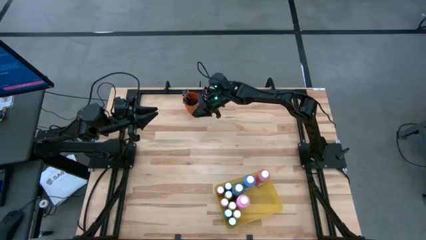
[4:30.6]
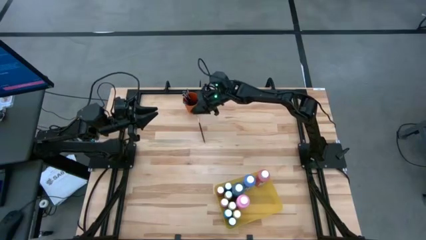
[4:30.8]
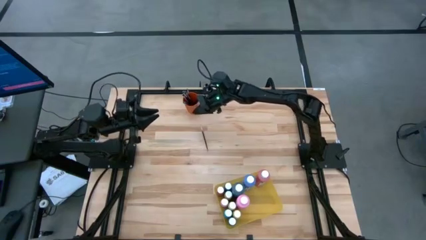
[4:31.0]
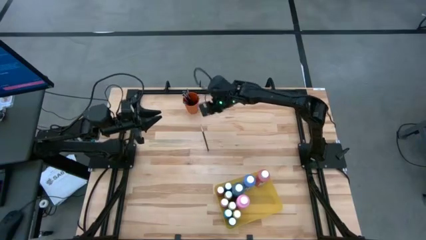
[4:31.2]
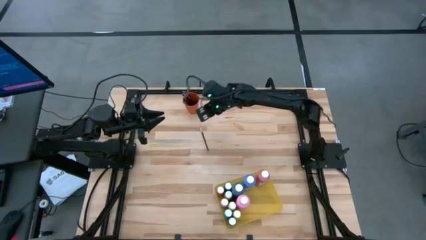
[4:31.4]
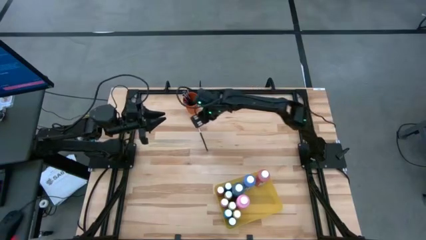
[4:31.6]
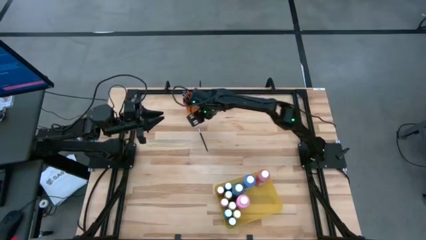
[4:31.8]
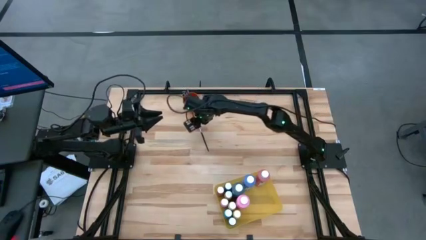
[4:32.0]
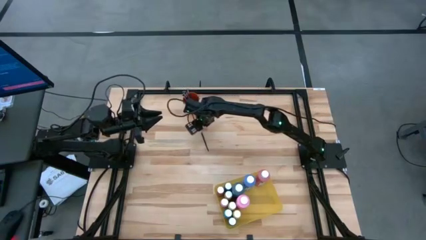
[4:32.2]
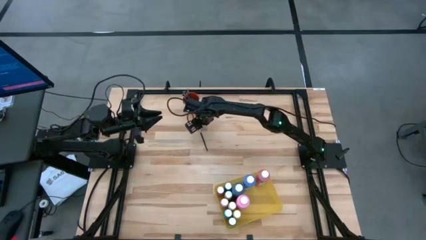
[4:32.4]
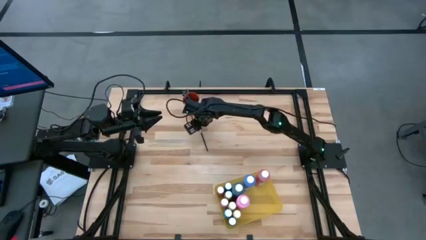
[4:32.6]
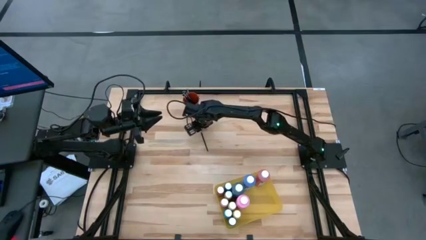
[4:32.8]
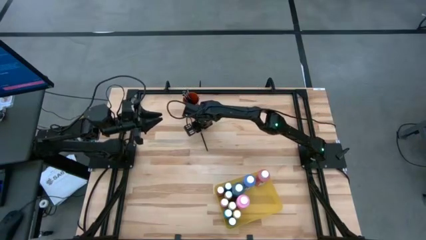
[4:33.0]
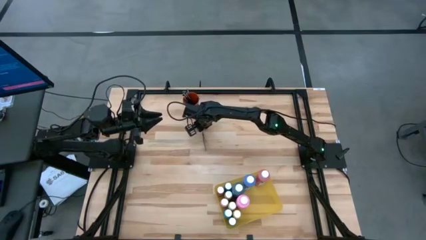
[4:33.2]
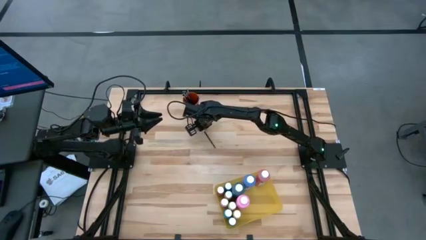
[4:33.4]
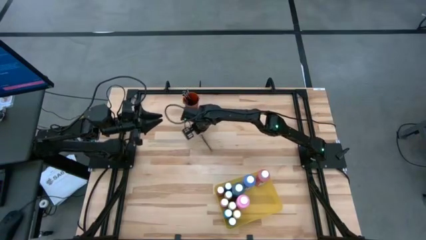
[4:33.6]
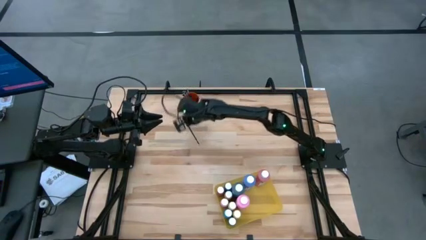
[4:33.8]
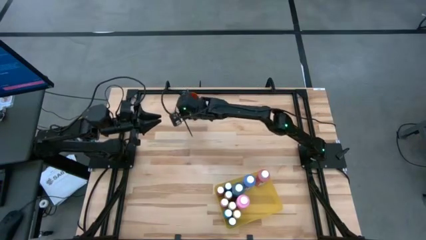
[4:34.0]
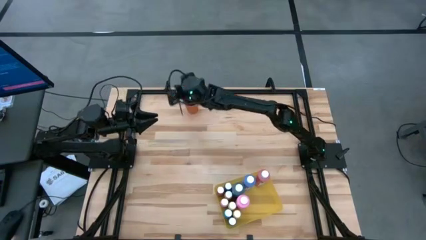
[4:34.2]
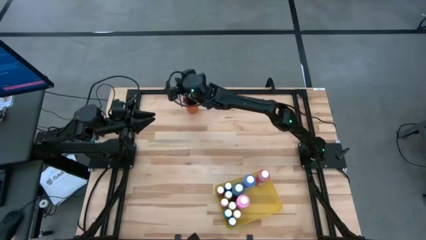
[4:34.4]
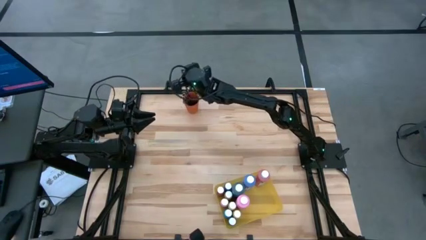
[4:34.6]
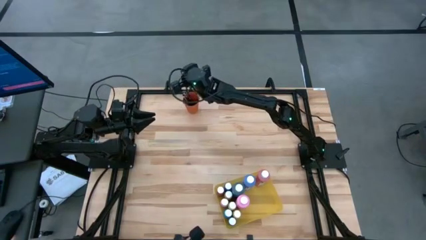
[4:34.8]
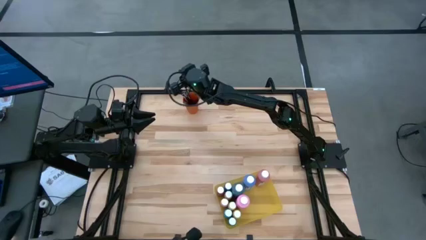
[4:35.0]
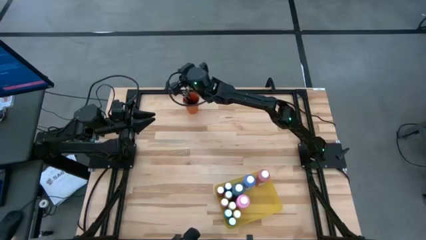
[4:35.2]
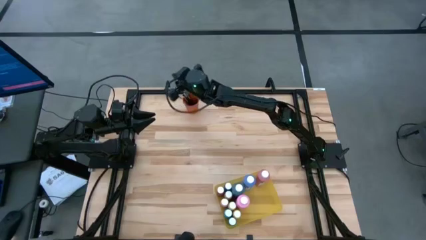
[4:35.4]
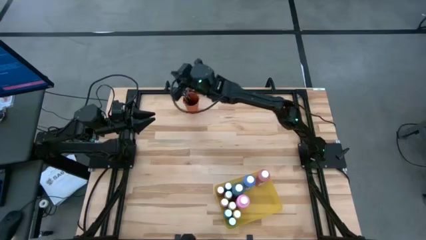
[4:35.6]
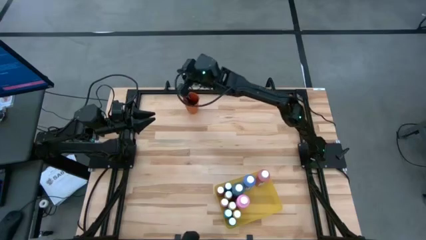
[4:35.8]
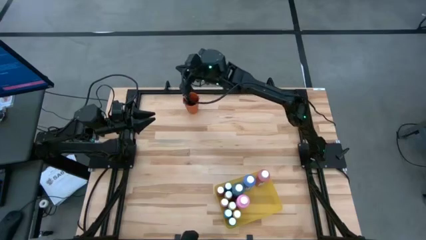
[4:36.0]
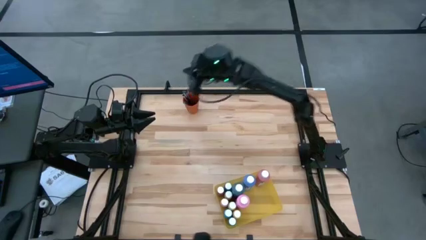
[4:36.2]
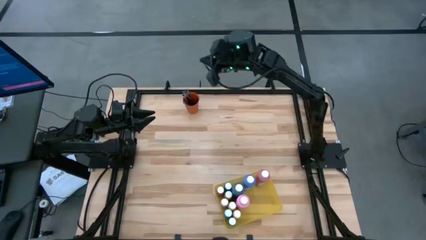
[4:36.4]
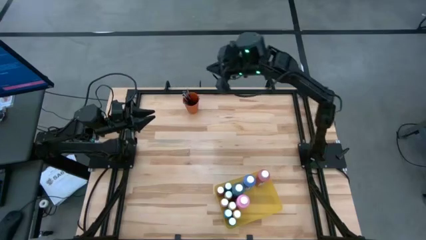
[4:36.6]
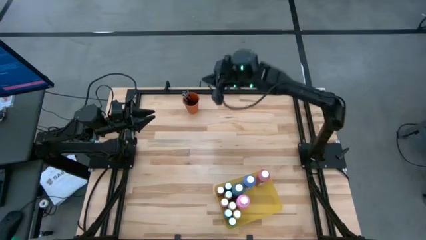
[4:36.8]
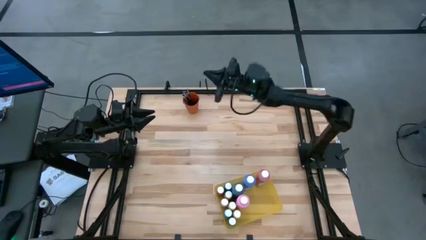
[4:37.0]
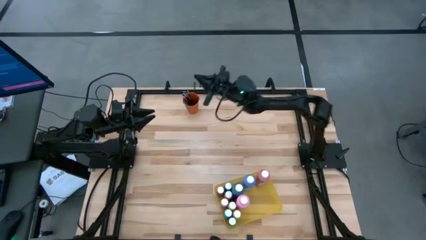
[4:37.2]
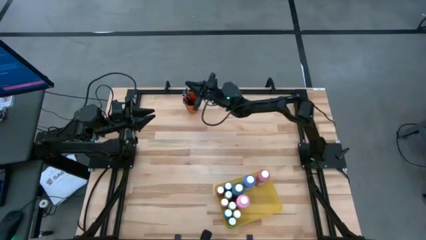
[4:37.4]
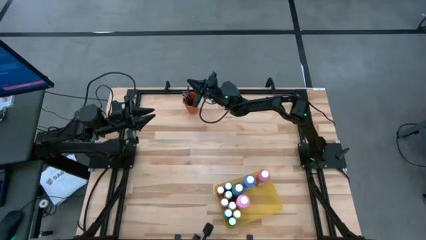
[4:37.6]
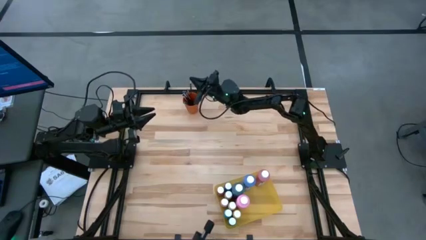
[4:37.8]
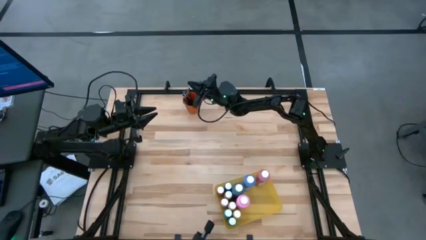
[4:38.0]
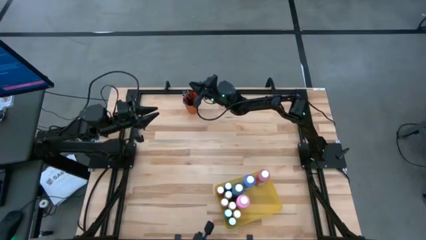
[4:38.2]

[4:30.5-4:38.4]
Task: Pick & Place Paint Supplies
Put the black paint brush into the orange cup

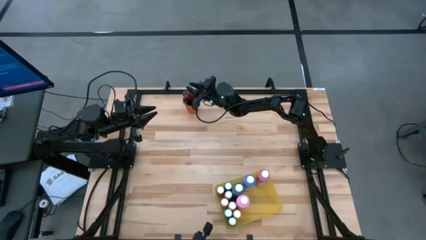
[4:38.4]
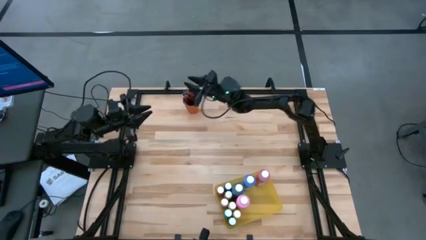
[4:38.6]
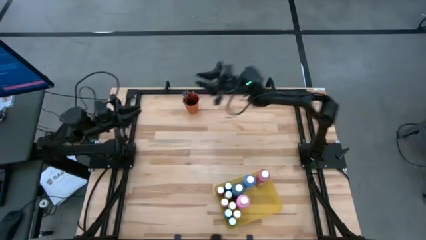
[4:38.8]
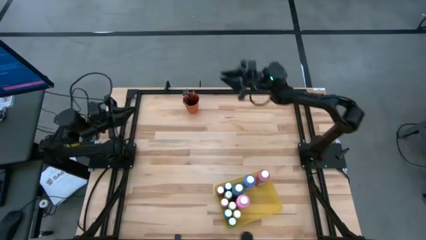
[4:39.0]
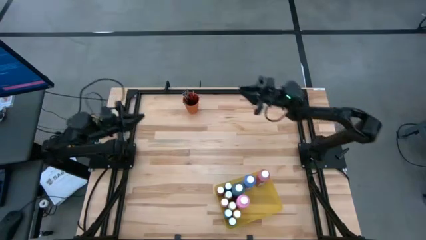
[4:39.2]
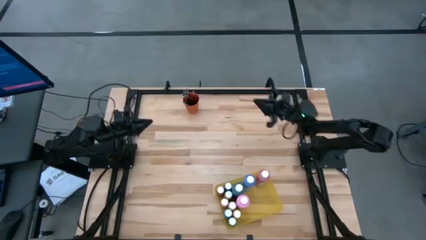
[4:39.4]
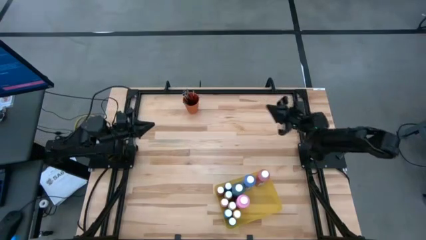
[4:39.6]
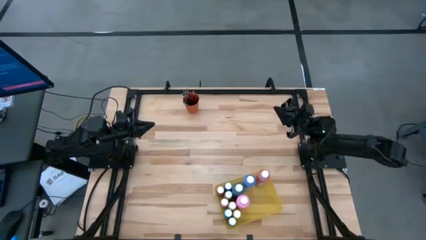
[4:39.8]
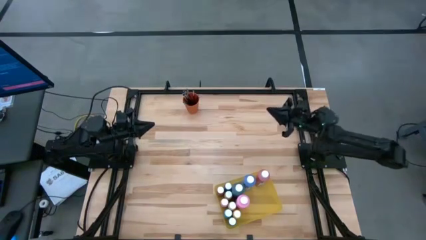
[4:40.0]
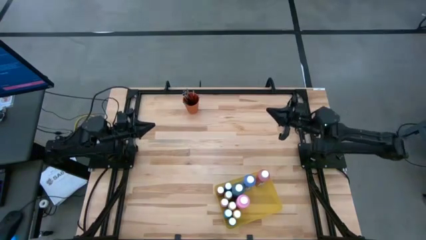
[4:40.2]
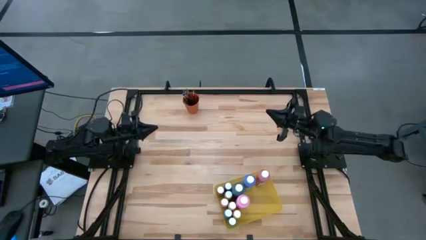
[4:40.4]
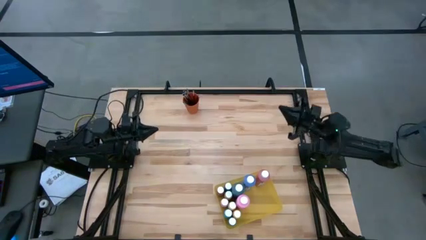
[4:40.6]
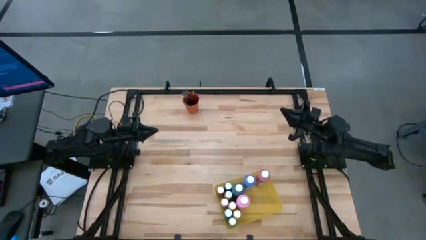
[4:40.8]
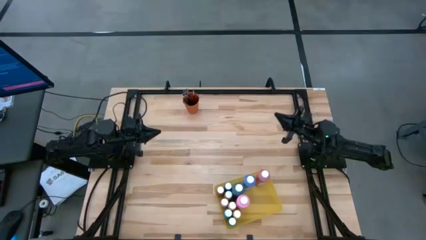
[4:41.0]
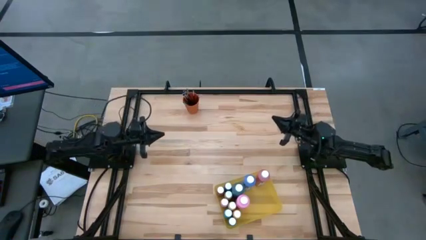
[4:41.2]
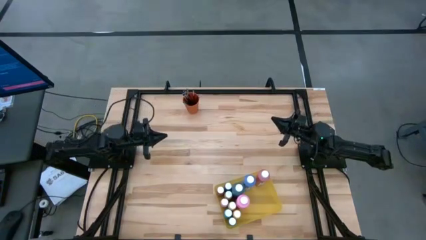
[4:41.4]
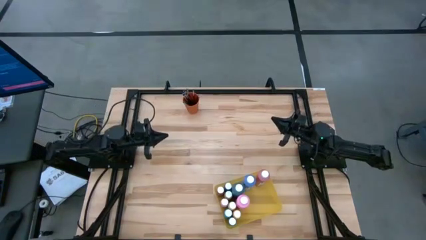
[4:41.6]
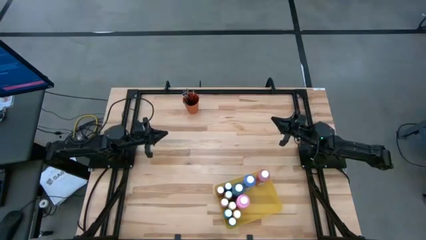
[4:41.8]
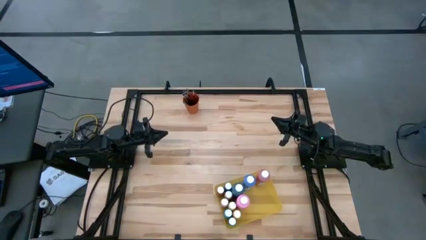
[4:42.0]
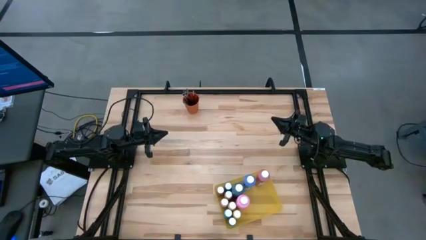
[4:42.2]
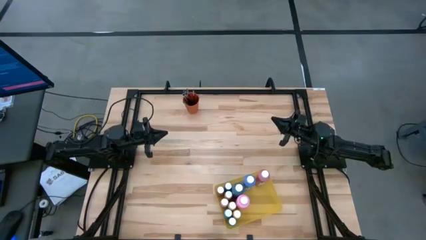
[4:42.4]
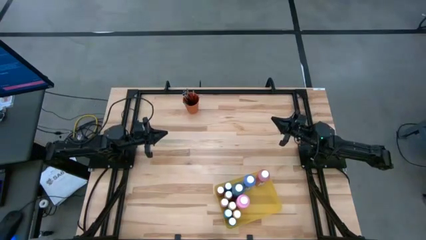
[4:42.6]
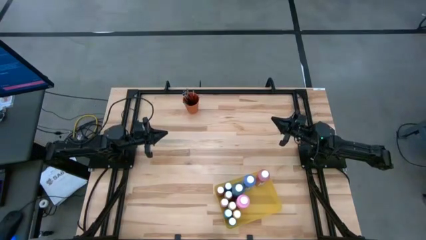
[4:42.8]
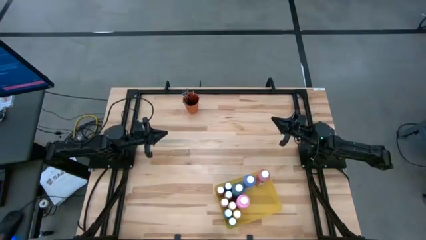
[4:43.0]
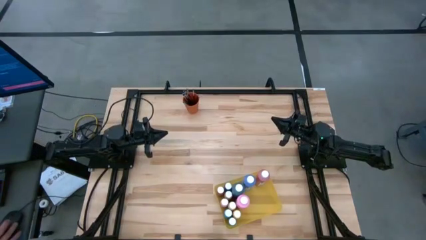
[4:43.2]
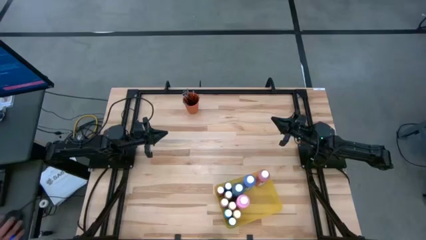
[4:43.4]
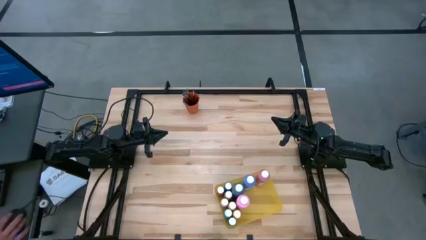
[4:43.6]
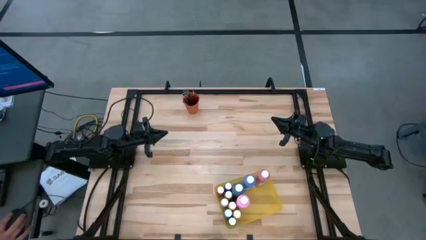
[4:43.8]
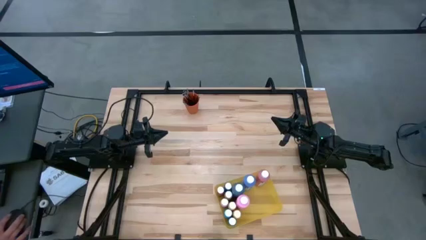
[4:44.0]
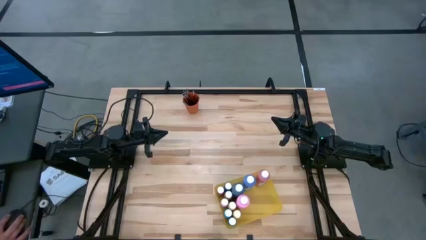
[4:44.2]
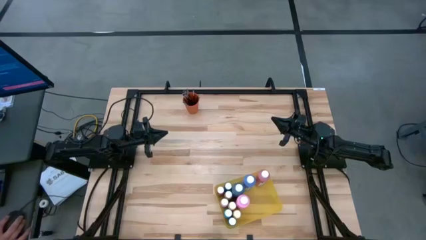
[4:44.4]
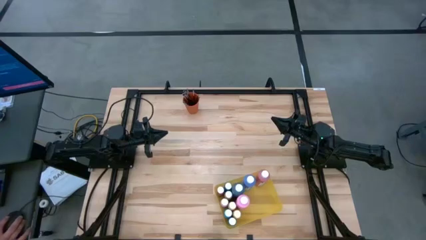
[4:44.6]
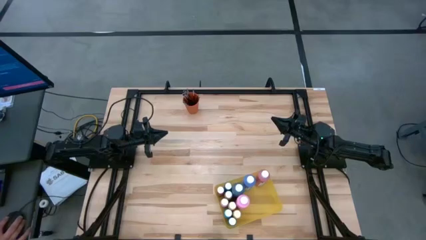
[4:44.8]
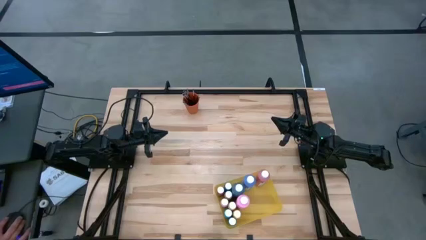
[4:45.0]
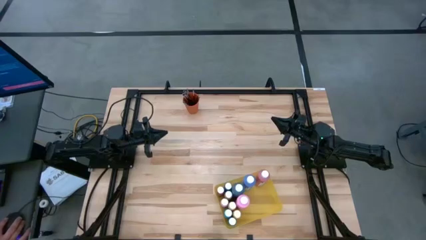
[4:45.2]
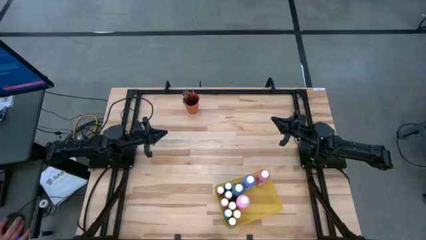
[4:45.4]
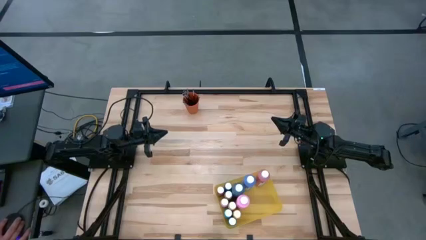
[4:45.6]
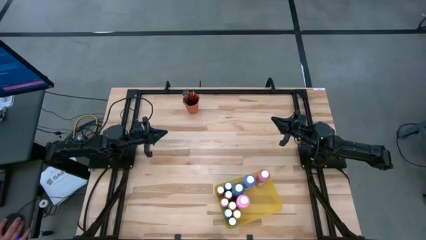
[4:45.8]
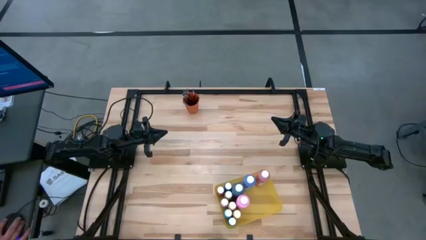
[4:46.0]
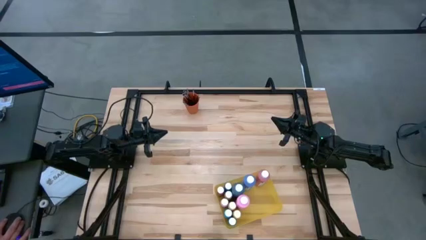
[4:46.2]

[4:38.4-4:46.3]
Return to Home Position
